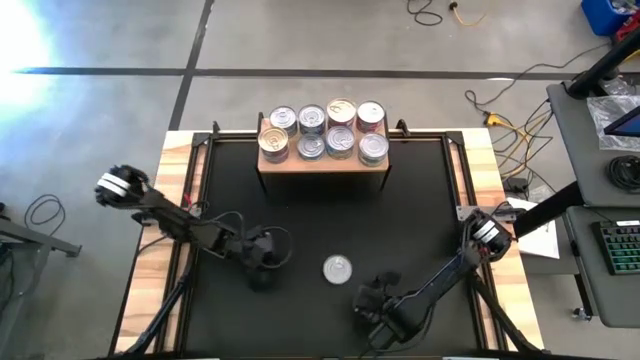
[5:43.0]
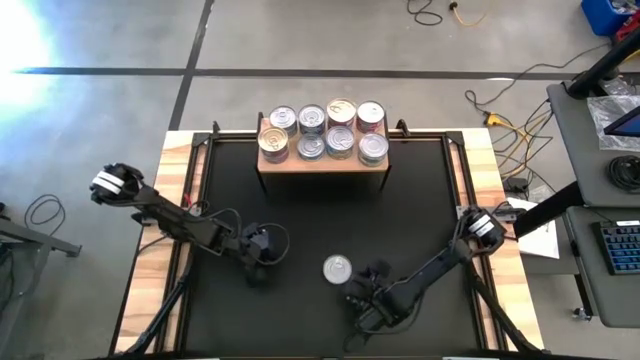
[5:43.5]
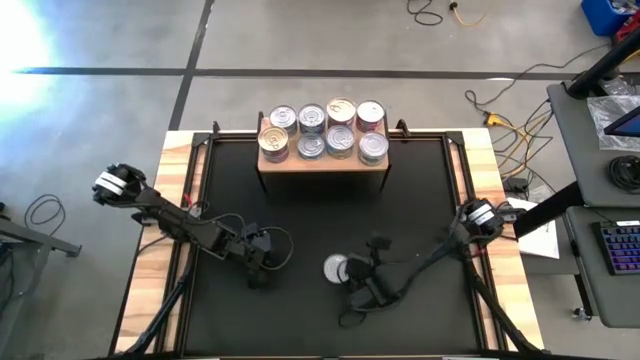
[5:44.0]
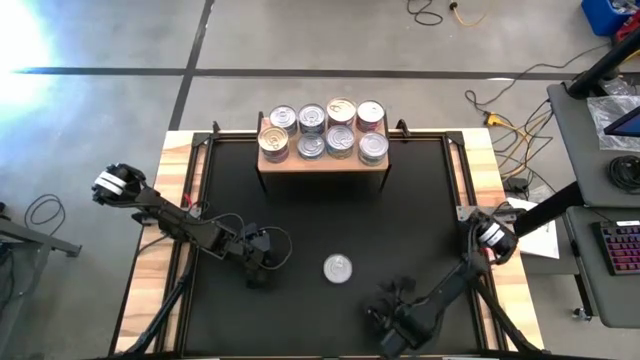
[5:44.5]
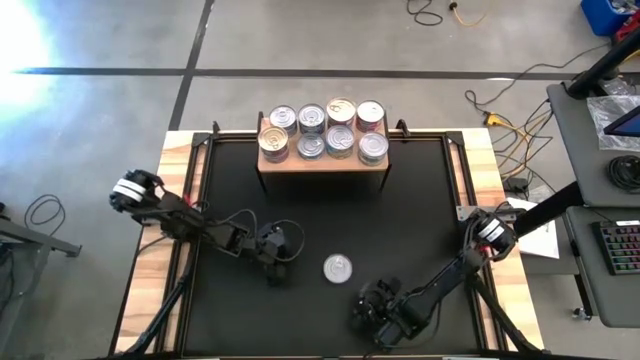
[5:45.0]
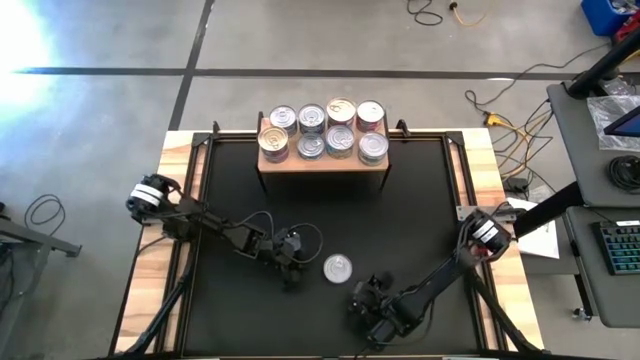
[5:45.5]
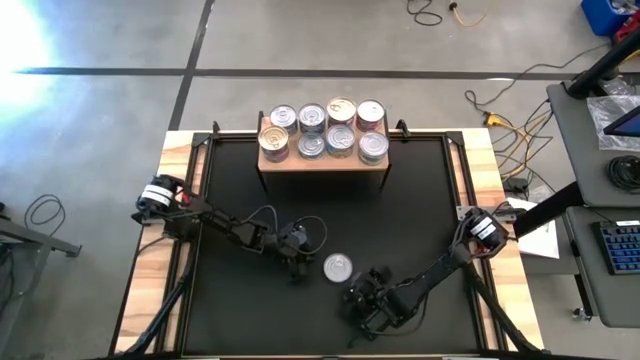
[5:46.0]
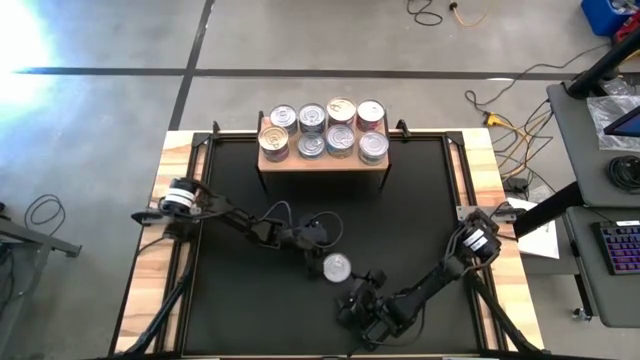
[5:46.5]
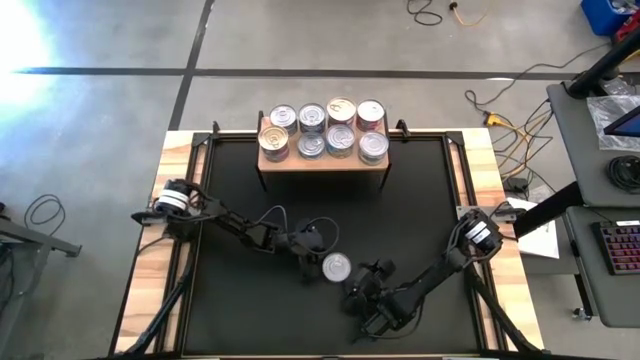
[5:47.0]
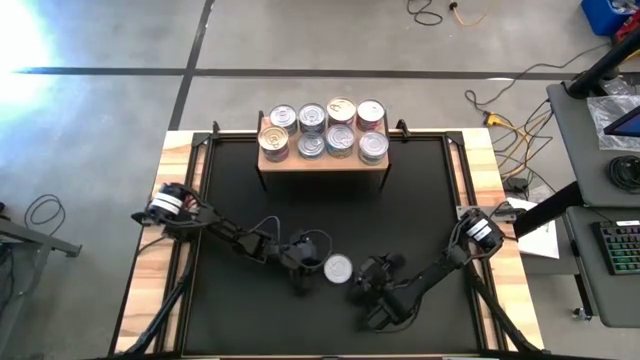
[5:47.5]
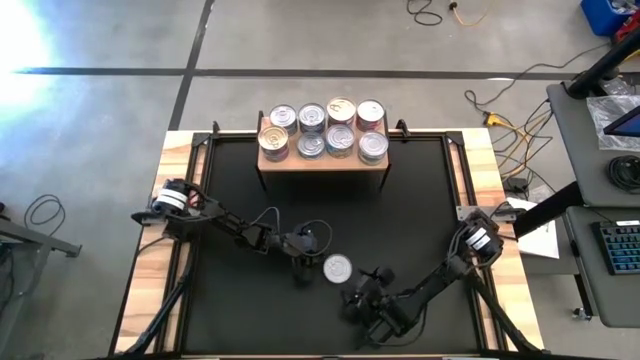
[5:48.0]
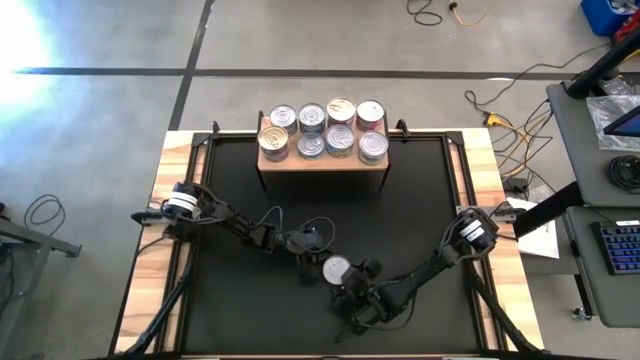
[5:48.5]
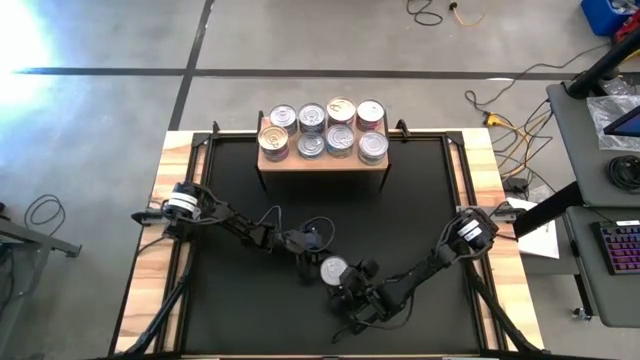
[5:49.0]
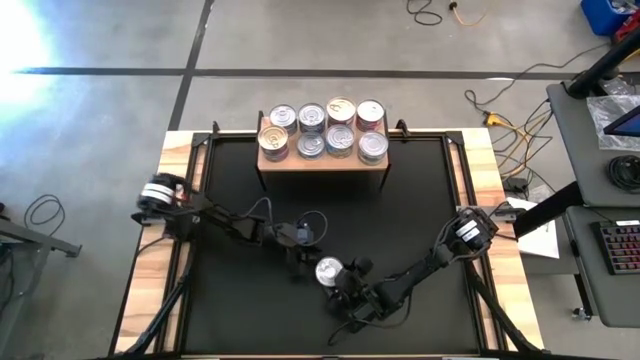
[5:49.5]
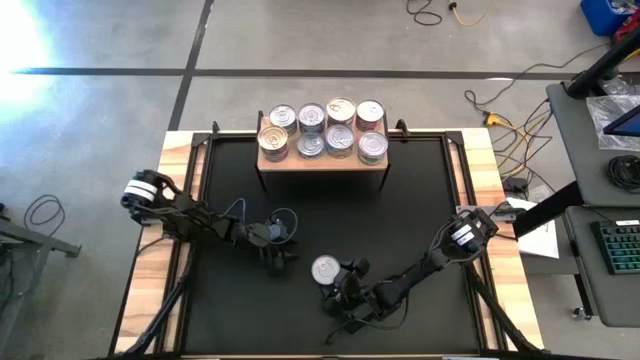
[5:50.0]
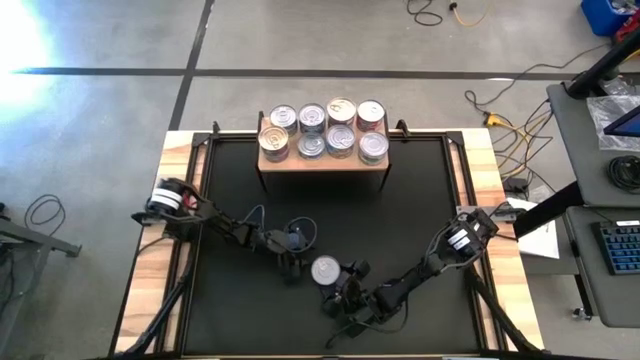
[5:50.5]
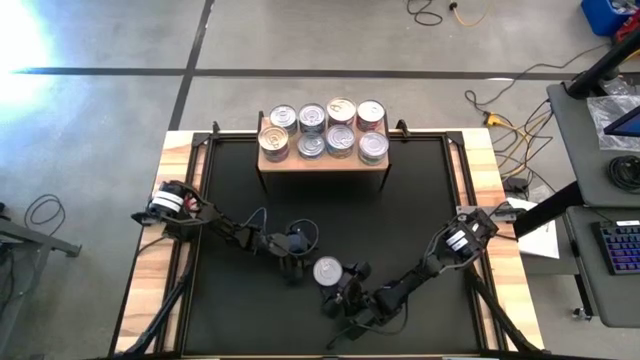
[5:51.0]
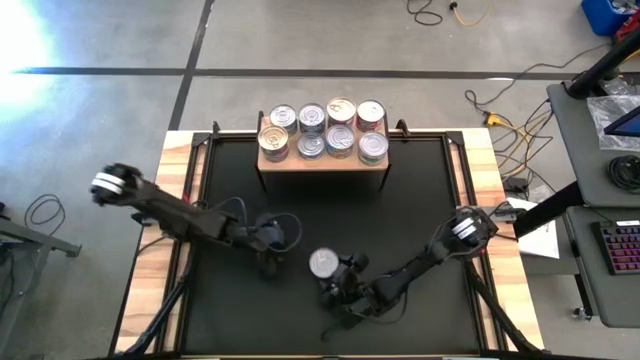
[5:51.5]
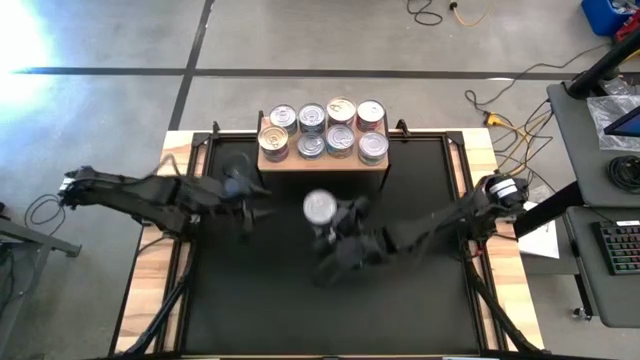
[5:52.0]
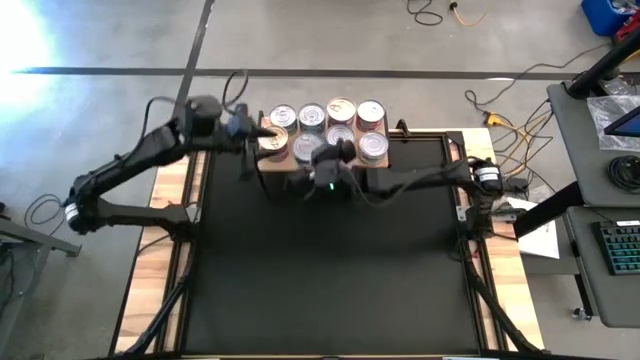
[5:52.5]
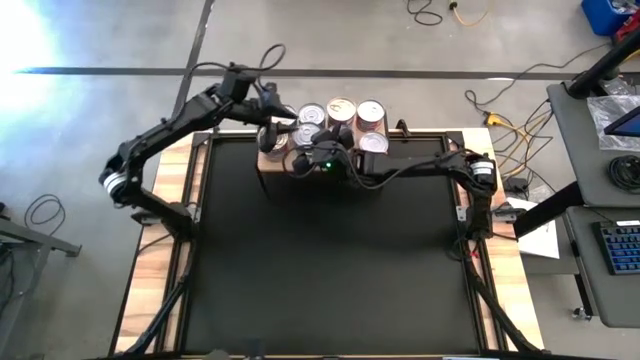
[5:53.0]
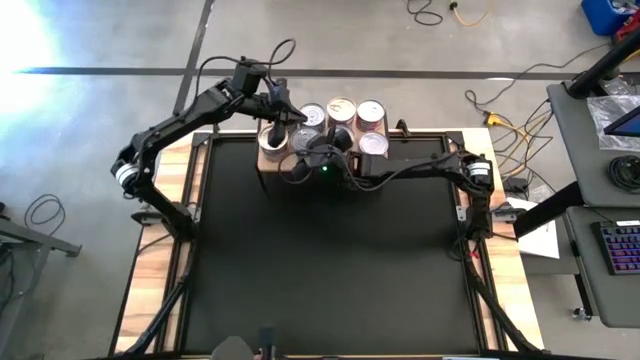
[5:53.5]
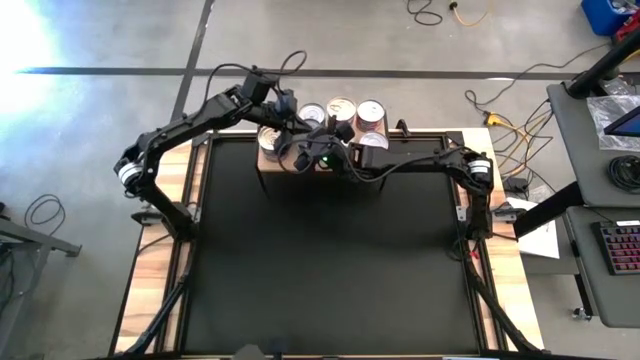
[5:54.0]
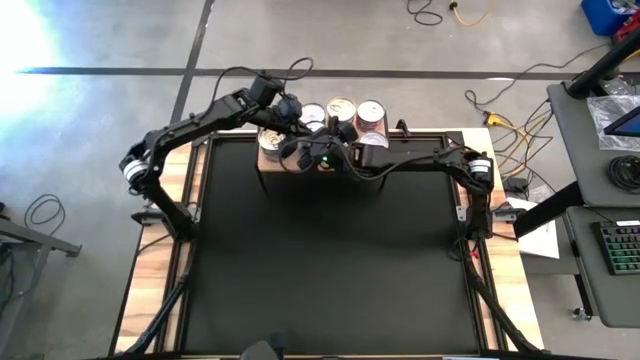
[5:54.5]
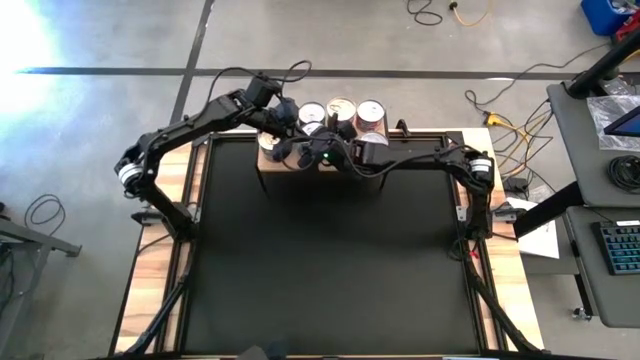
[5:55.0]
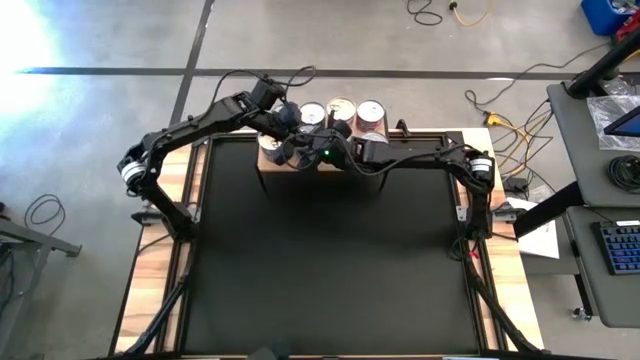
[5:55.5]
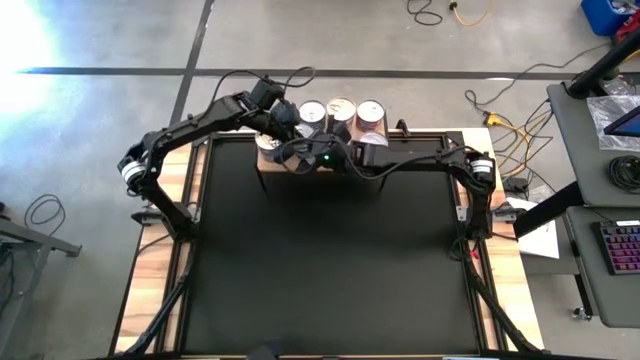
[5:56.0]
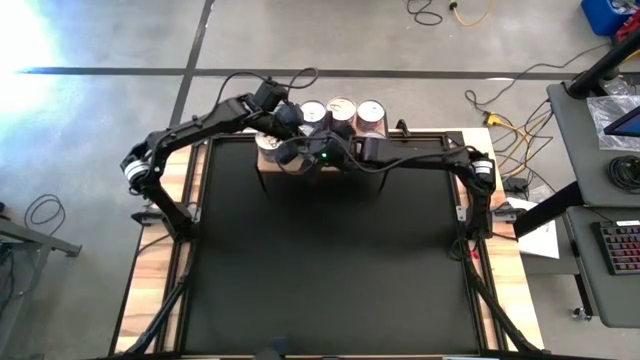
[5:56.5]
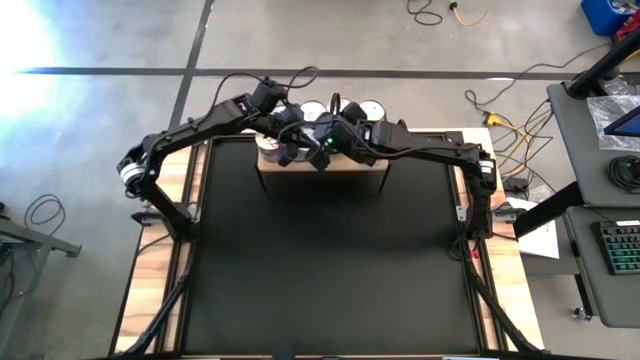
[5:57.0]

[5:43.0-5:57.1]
Task: Stack canned seafood by type on shelf
Stack the green-blue tuna can on top of the other green-blue tuna can on the shelf

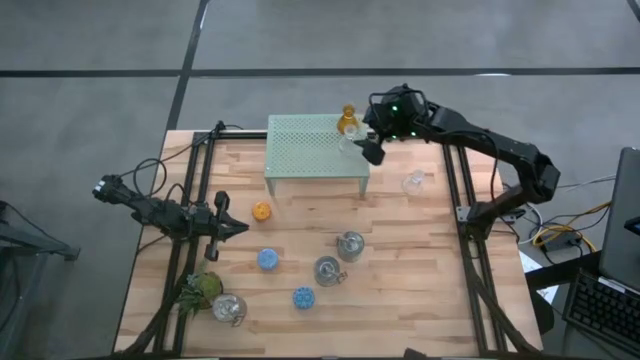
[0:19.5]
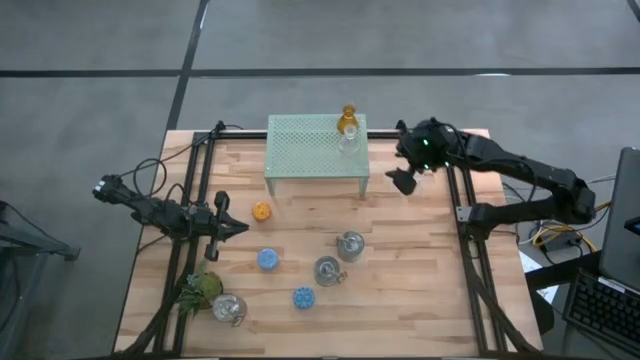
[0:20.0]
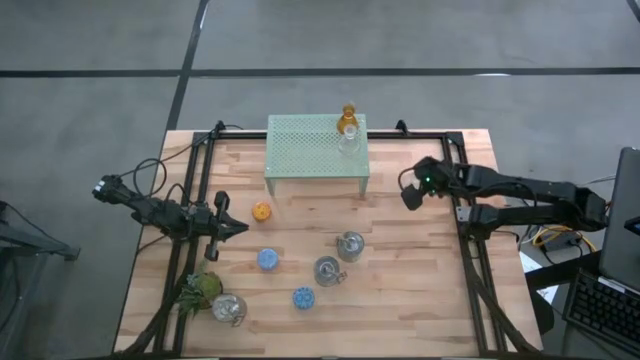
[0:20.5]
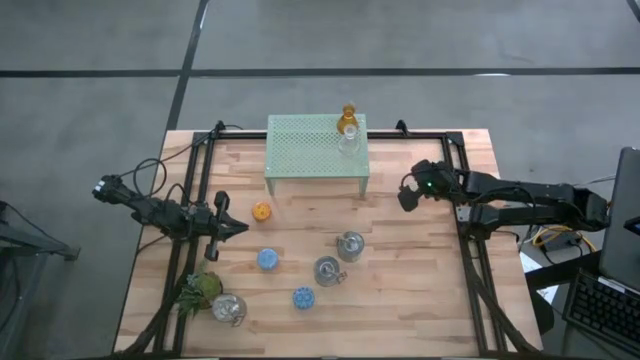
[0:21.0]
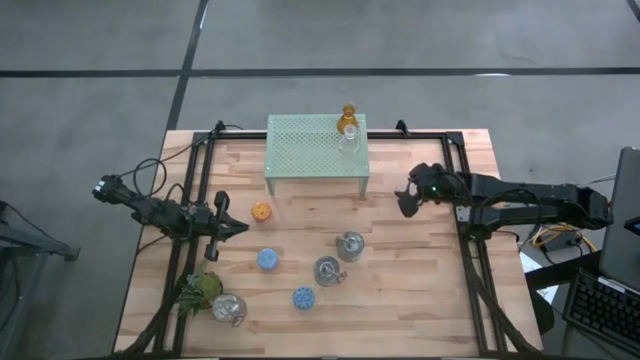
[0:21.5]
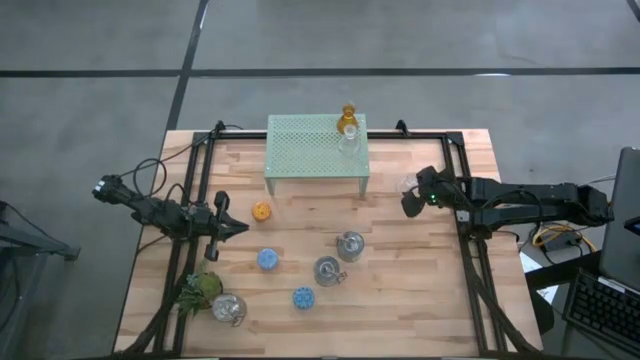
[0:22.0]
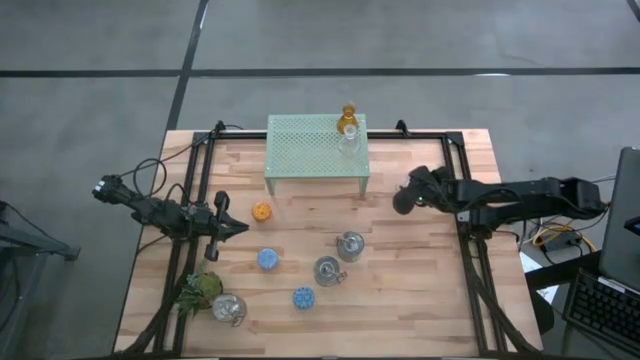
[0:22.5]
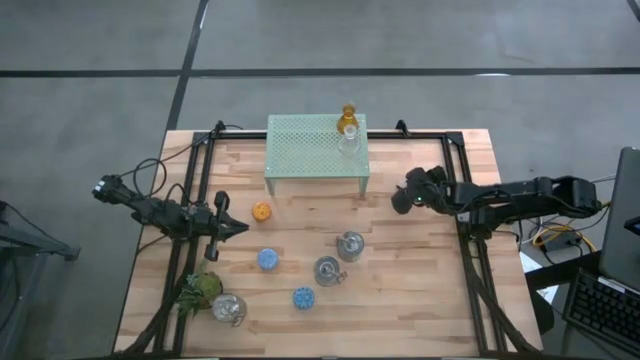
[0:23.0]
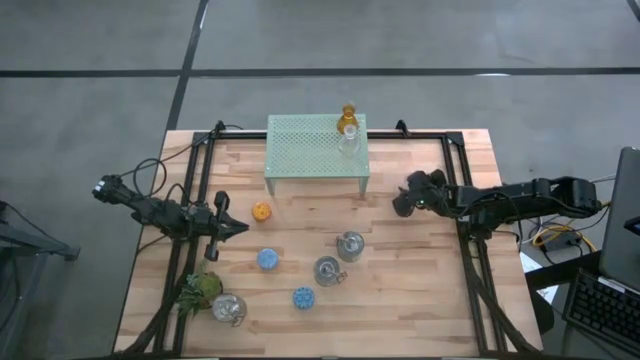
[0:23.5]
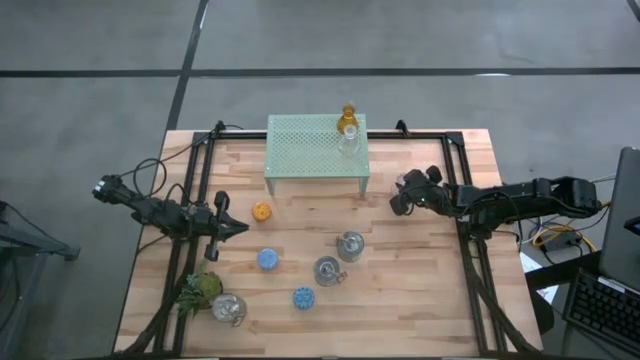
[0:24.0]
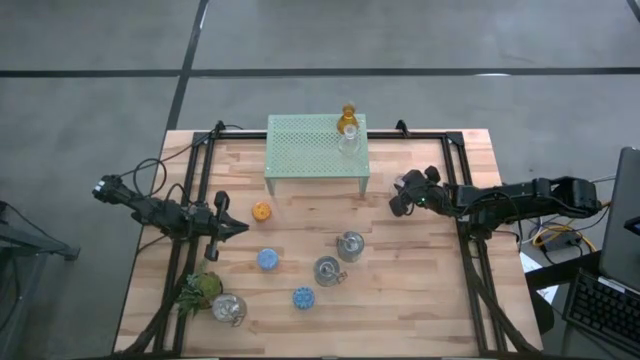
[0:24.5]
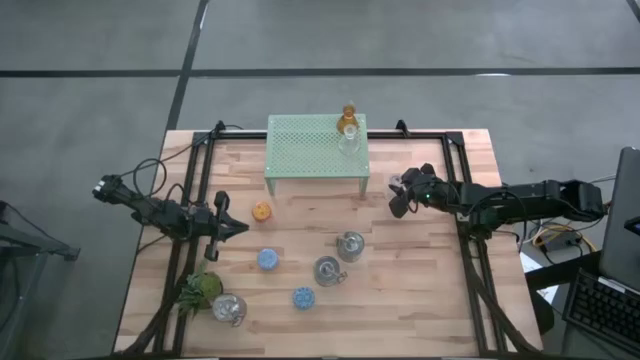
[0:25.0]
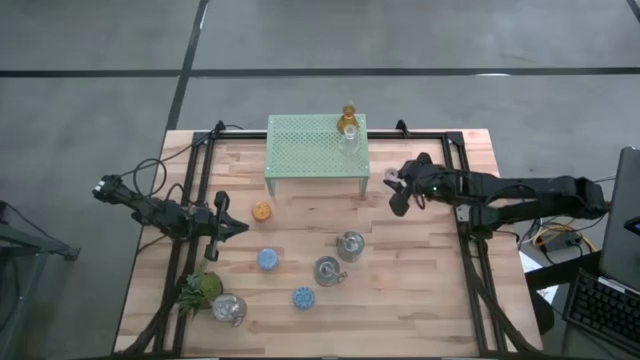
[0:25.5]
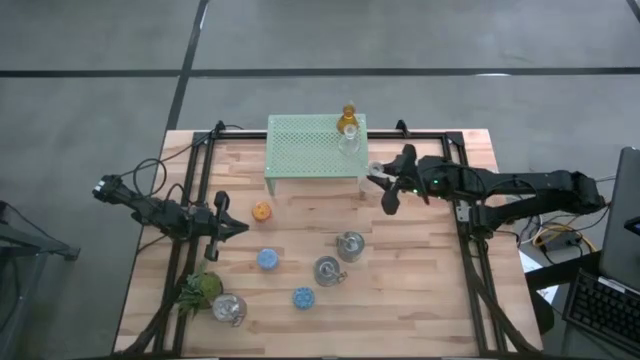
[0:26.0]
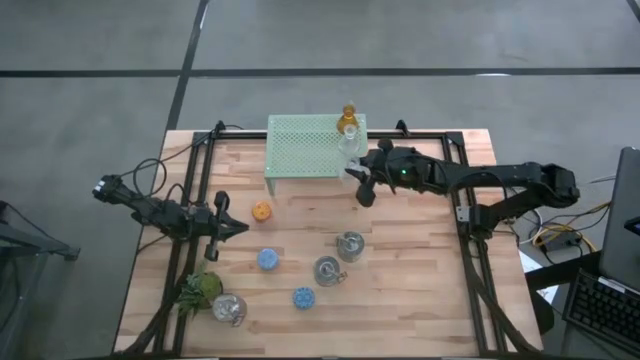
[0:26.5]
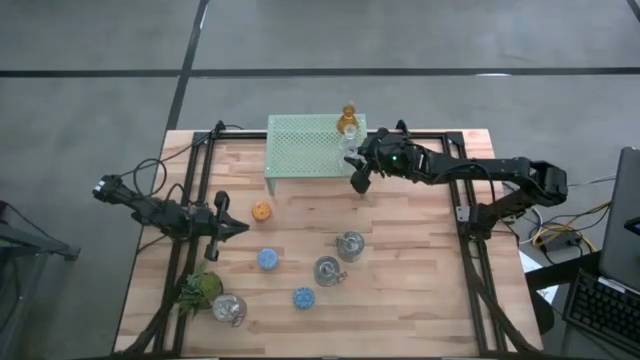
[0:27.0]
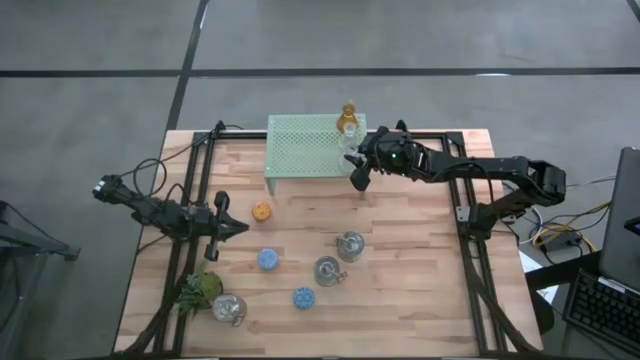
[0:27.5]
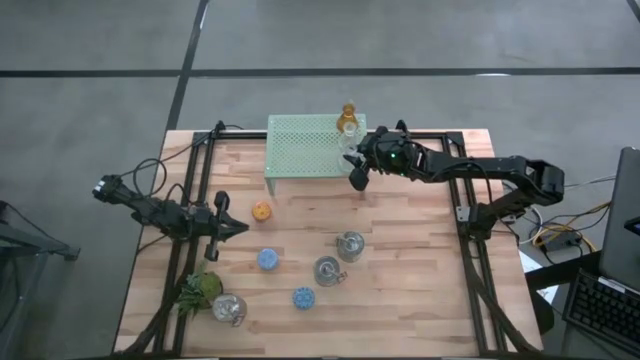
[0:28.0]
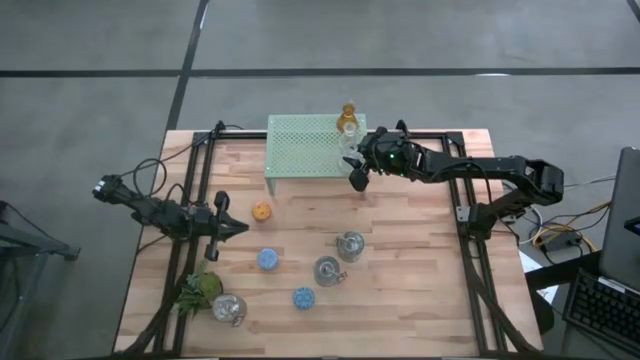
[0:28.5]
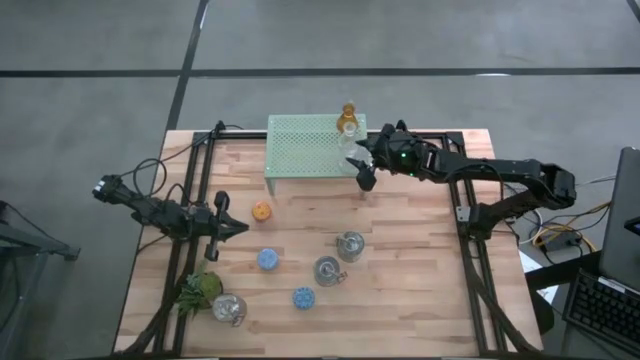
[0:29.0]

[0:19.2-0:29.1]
Task: Pick & Place candle stick holders
Put the transparent glass candle holder on the shelf
